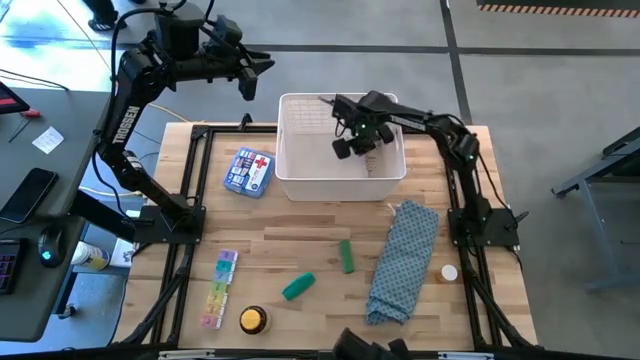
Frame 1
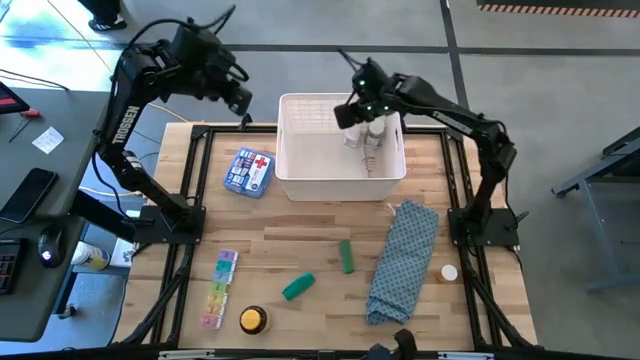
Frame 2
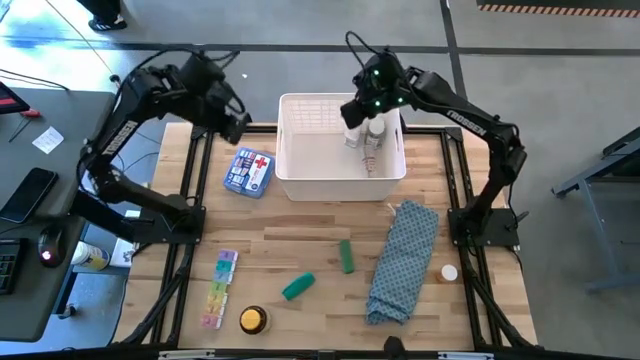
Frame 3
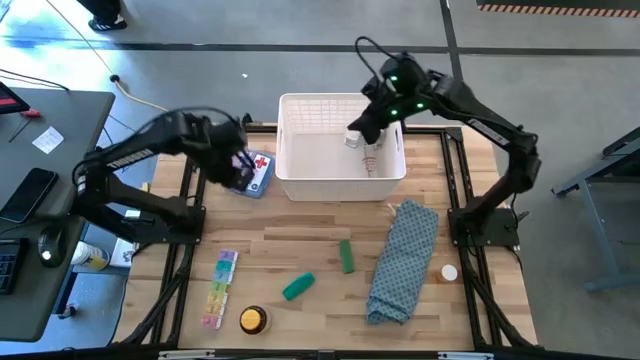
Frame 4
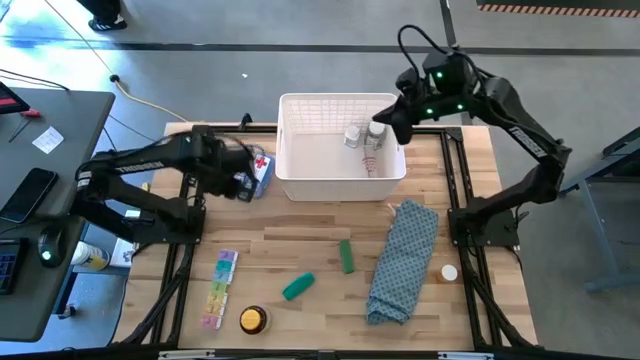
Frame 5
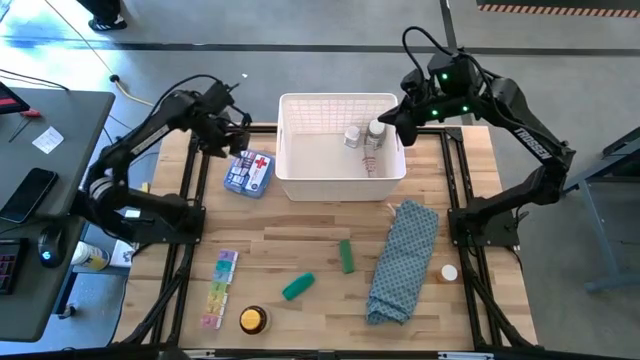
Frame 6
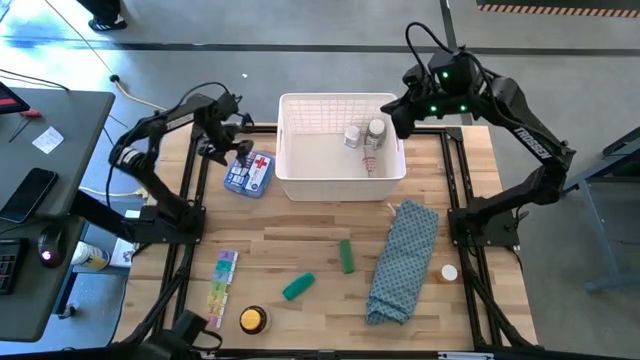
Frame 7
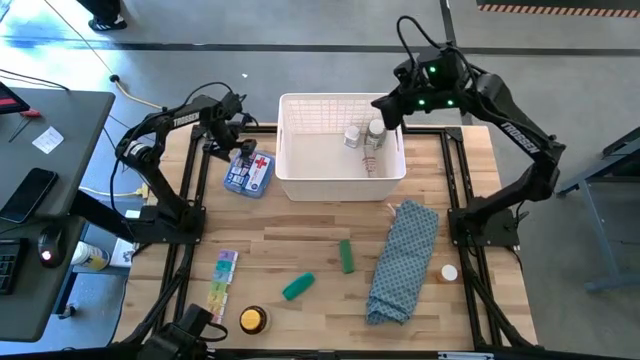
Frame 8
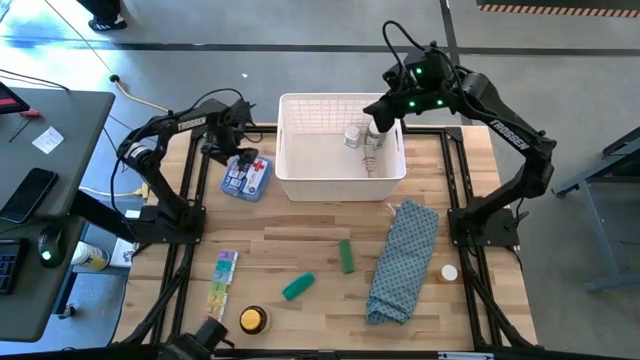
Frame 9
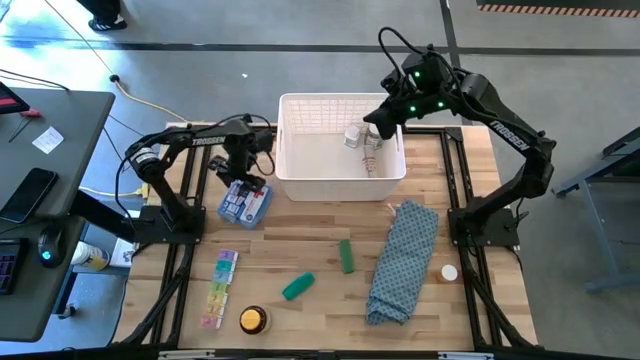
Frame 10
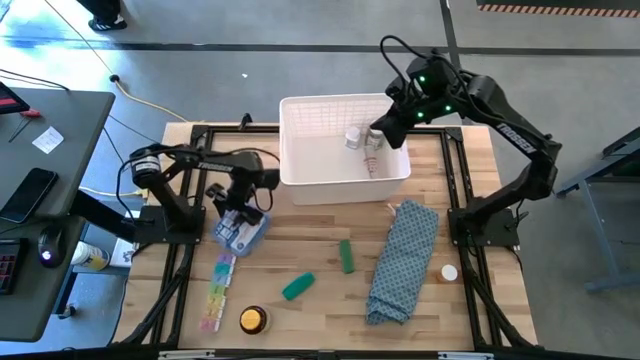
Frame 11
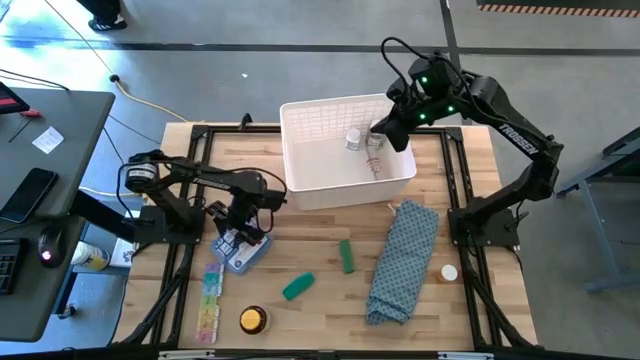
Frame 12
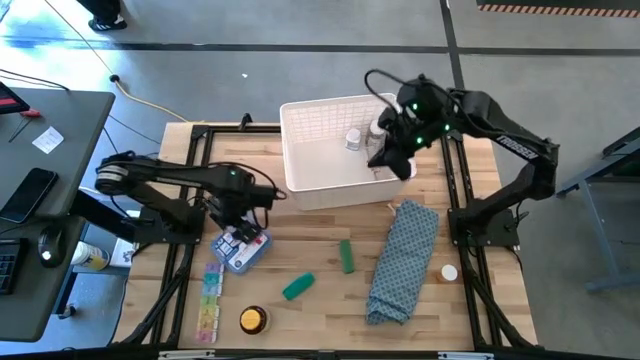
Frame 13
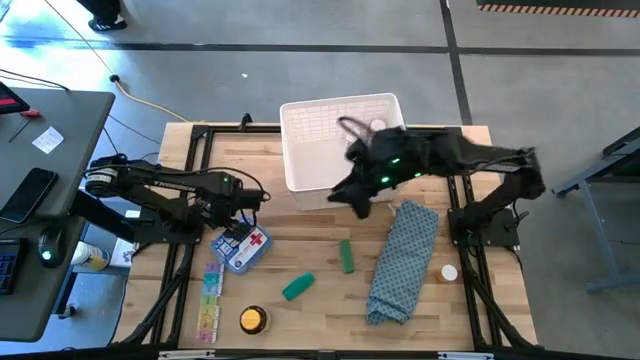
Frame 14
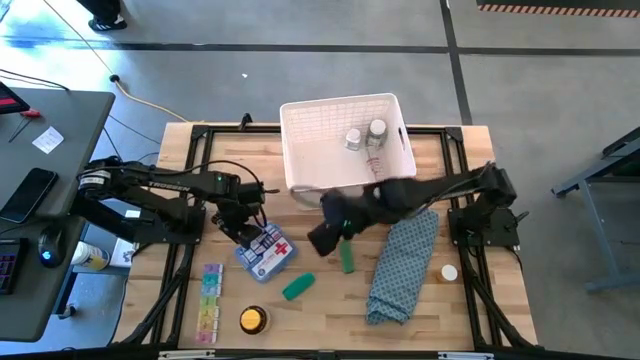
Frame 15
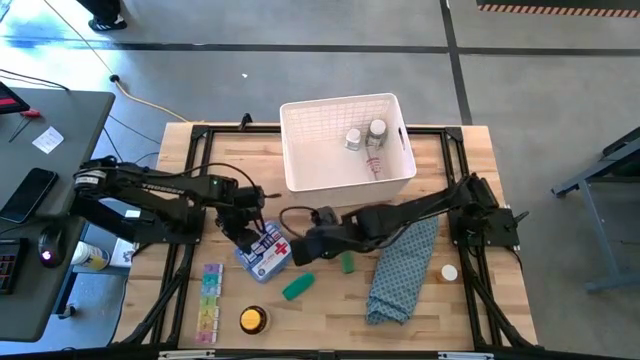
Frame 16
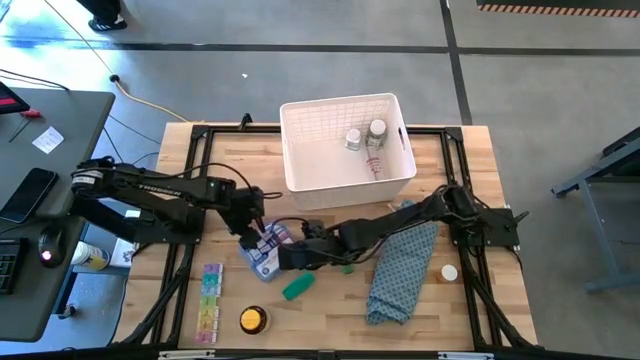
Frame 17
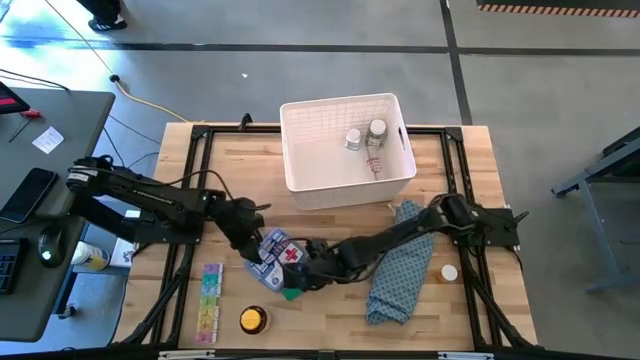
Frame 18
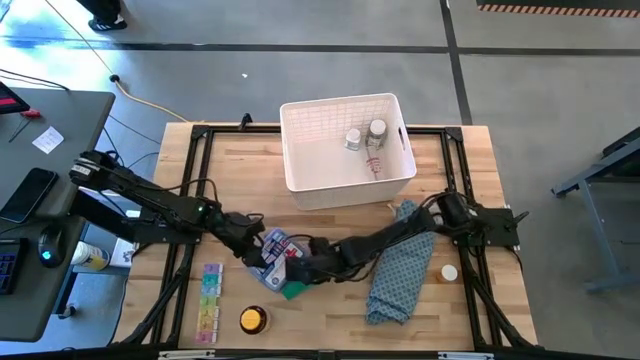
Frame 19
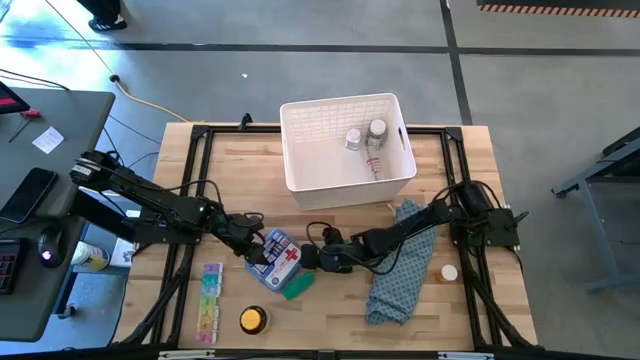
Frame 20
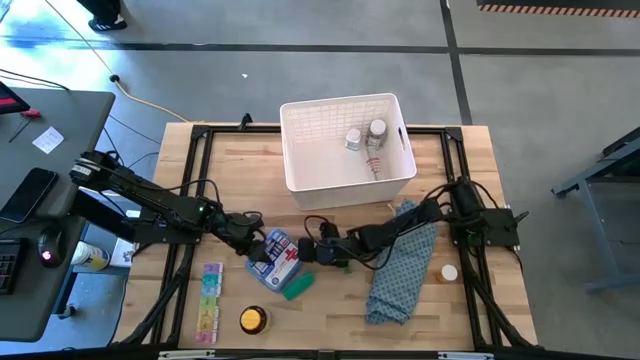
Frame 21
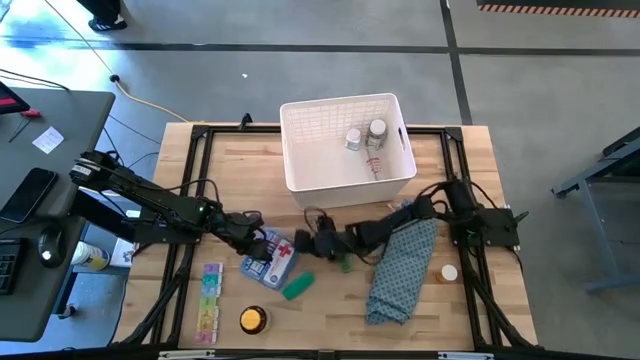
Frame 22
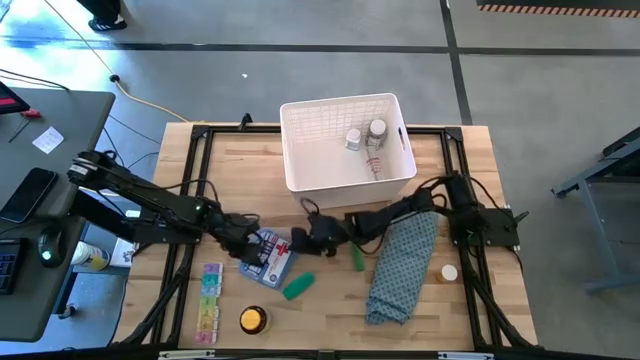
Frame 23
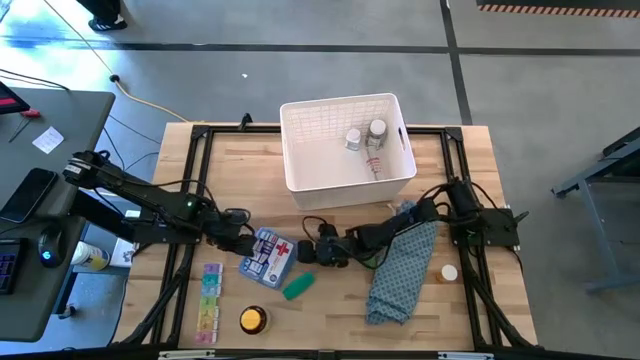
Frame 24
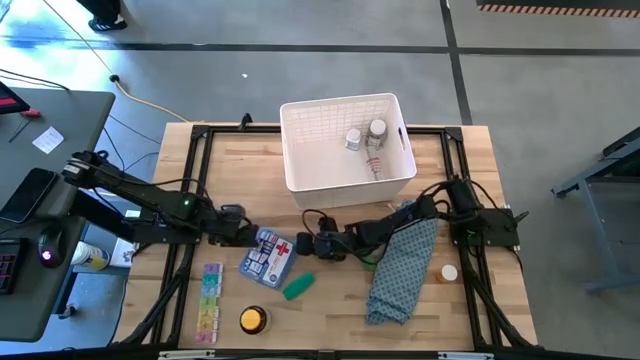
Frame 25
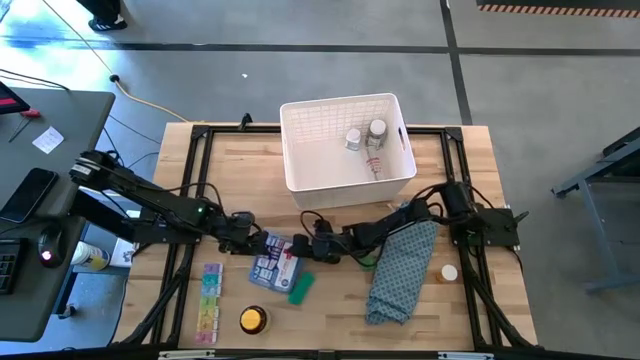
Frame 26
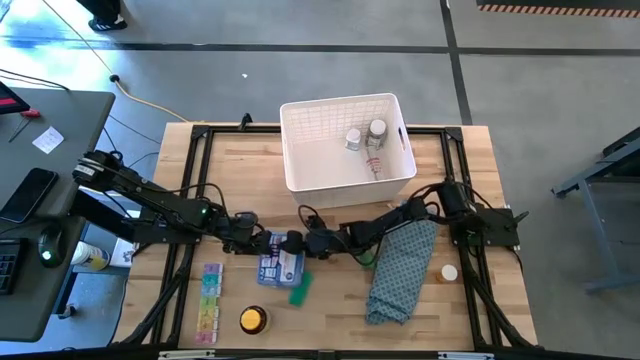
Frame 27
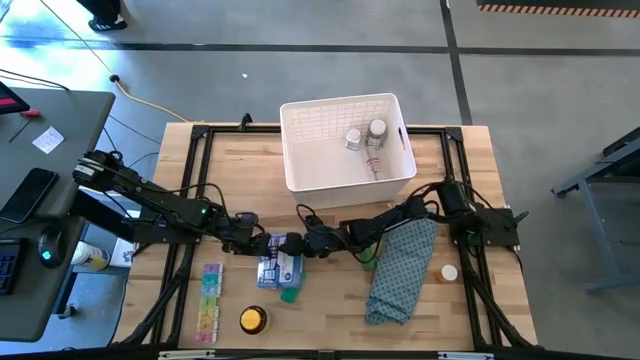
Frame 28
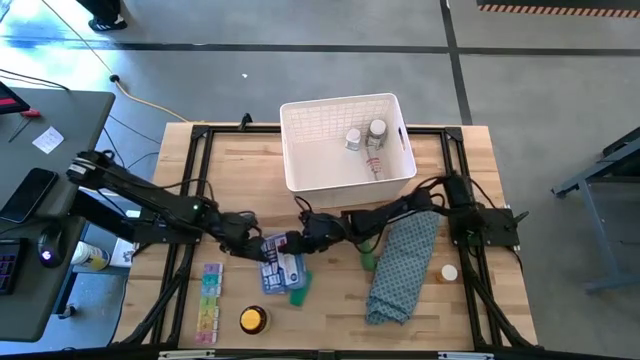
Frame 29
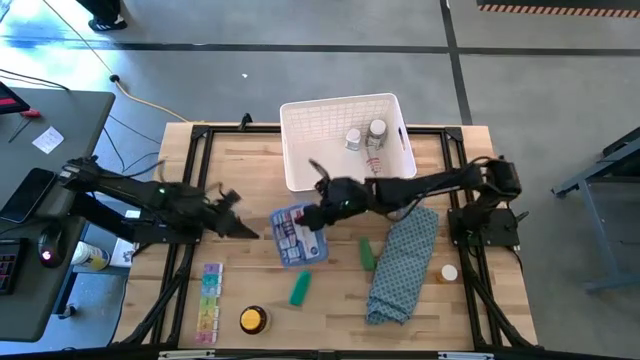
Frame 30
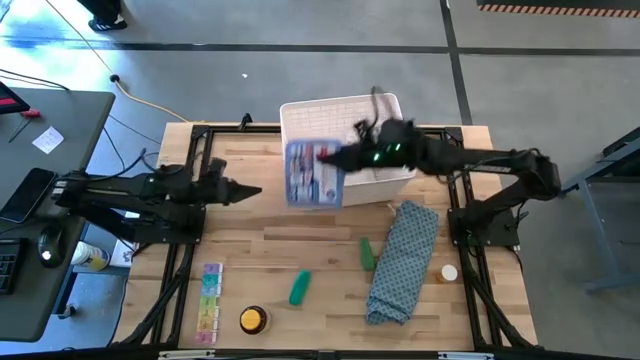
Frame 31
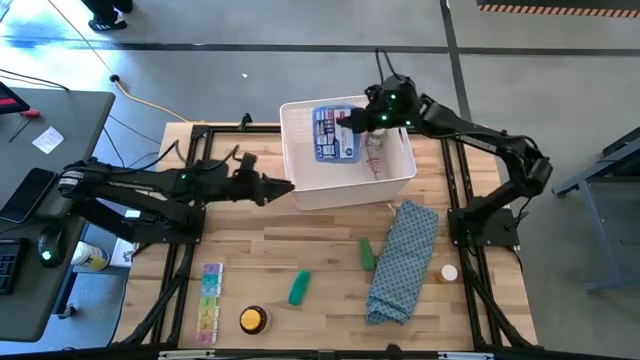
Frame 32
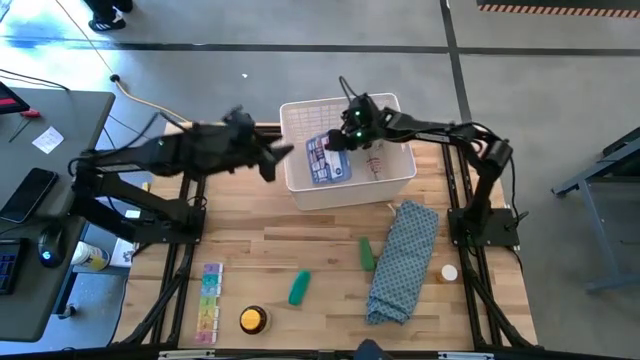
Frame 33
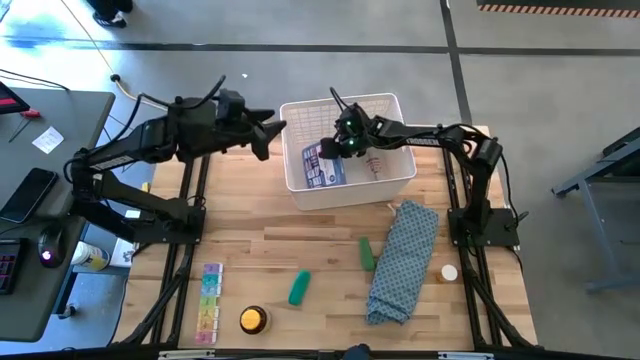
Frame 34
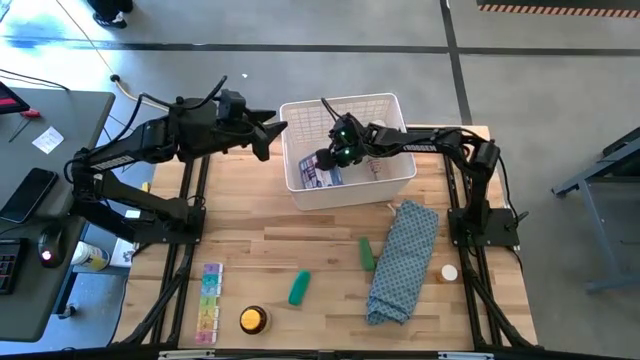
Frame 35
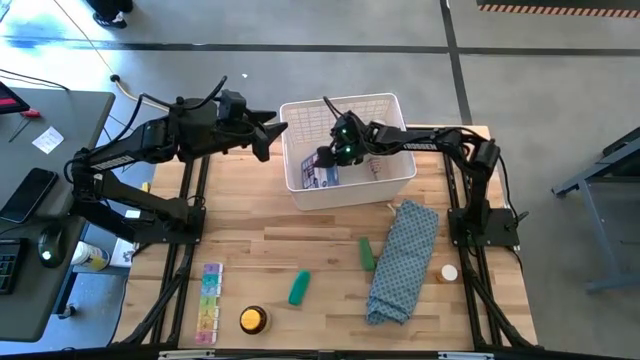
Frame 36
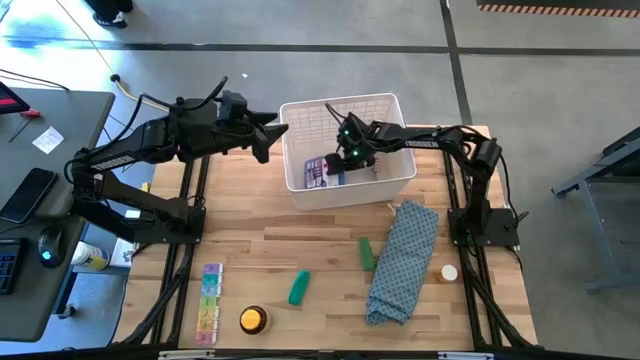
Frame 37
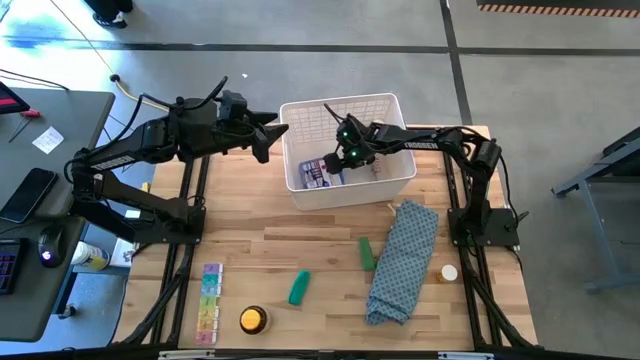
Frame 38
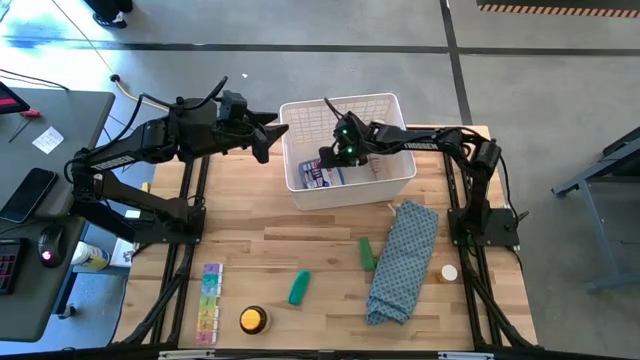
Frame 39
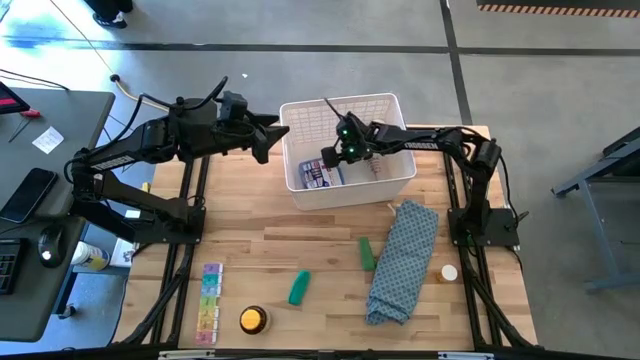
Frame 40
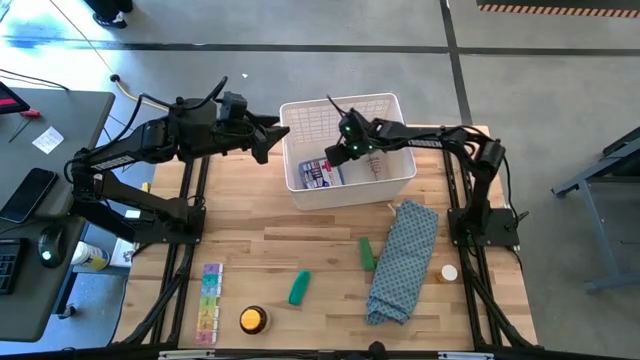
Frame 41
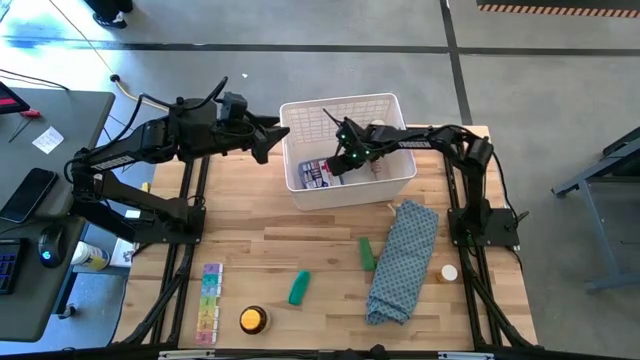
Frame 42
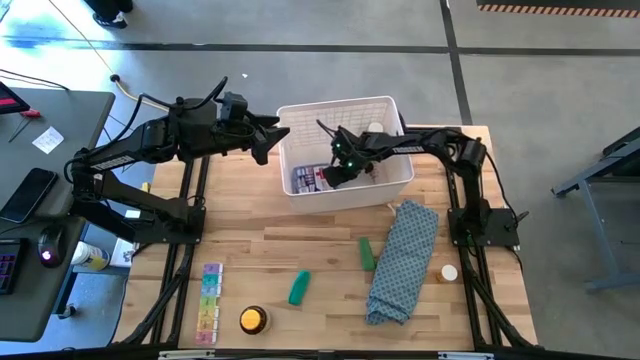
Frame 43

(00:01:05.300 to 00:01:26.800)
Task: Pick & place medical supplies in basket/bin
Put the blue first aid kit into the white bin

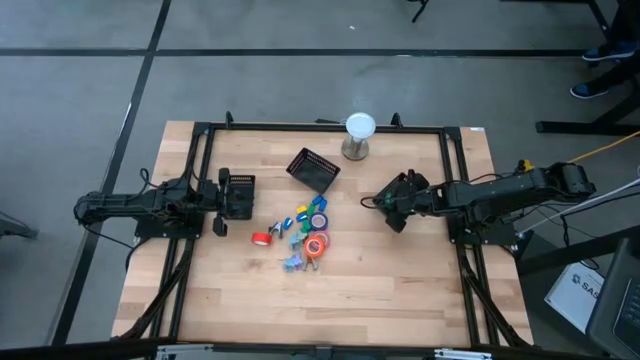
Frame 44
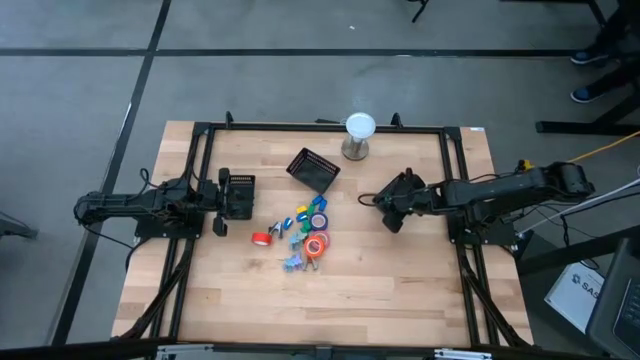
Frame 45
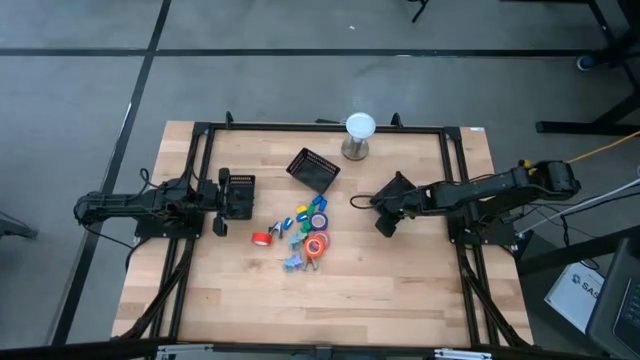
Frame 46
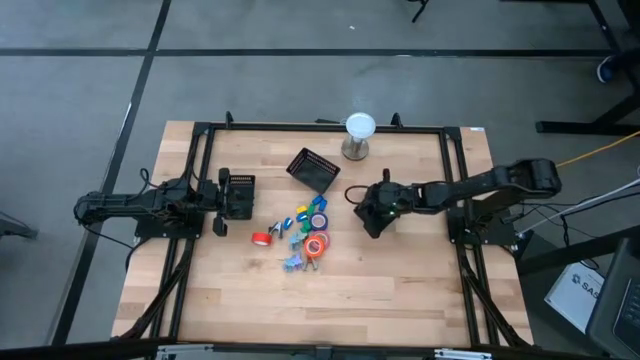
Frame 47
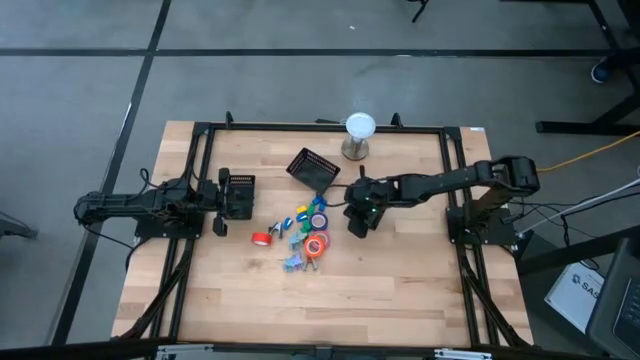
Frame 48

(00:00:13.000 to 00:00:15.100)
Task: Pick and place Stapler, Stapler remover, tape
Move the right black bin to the center right of the table
